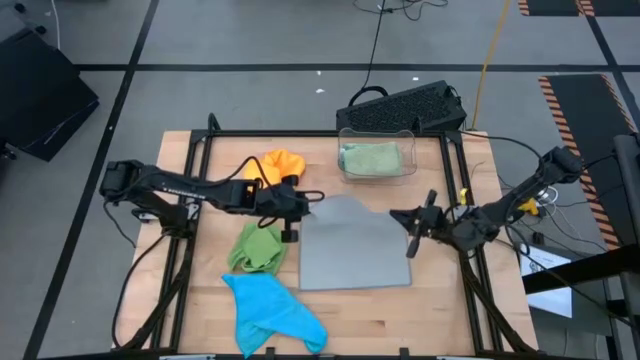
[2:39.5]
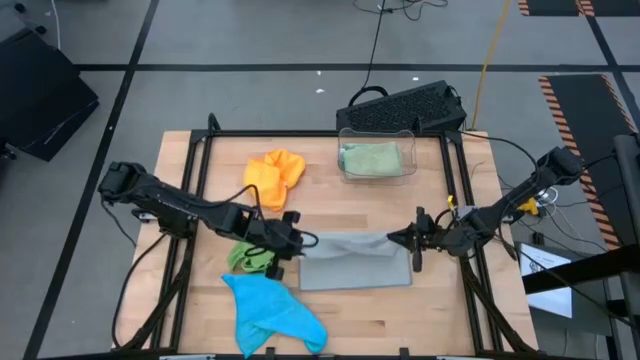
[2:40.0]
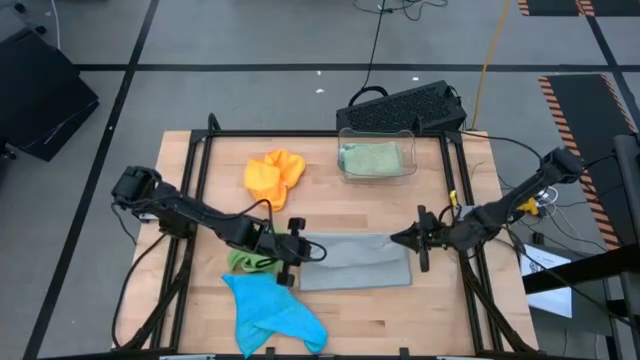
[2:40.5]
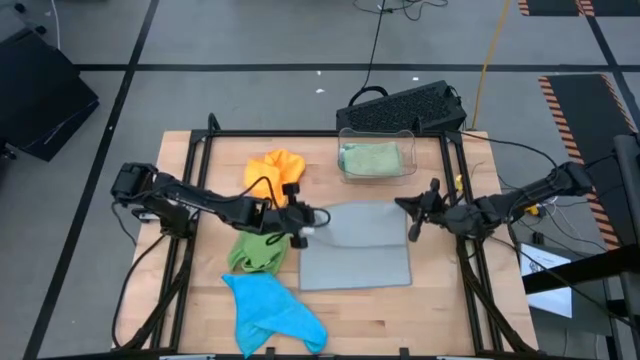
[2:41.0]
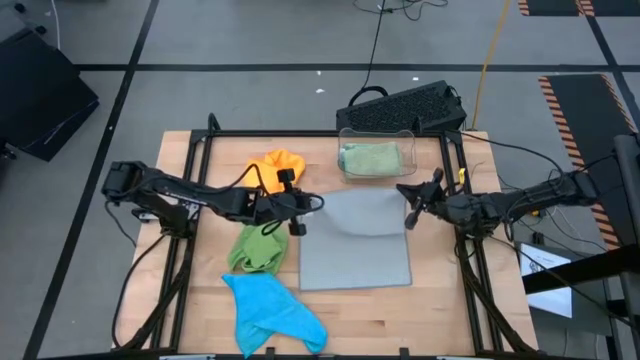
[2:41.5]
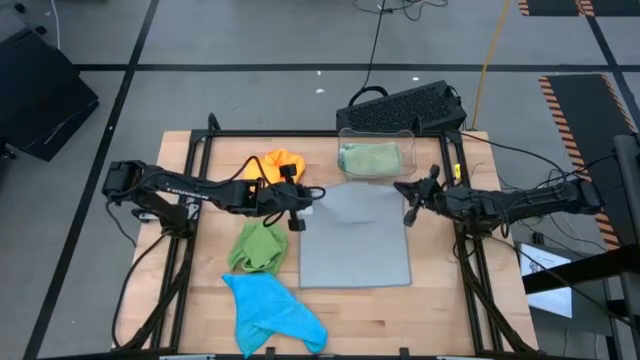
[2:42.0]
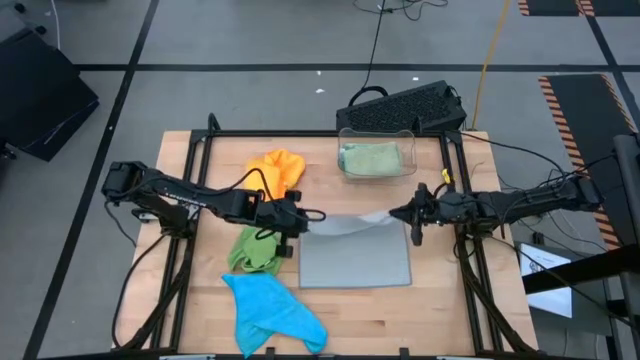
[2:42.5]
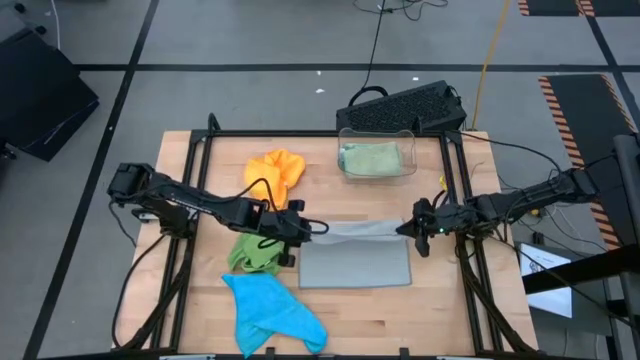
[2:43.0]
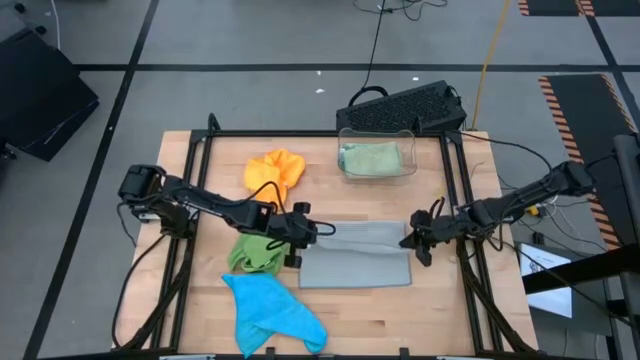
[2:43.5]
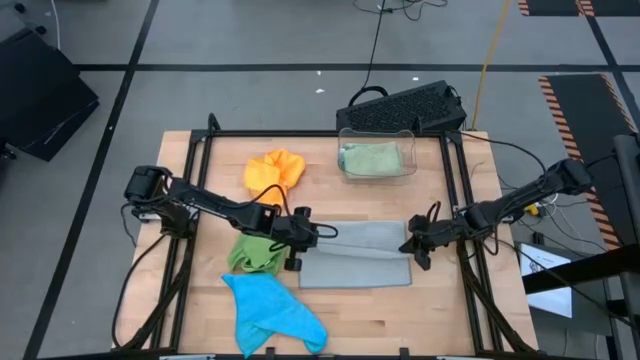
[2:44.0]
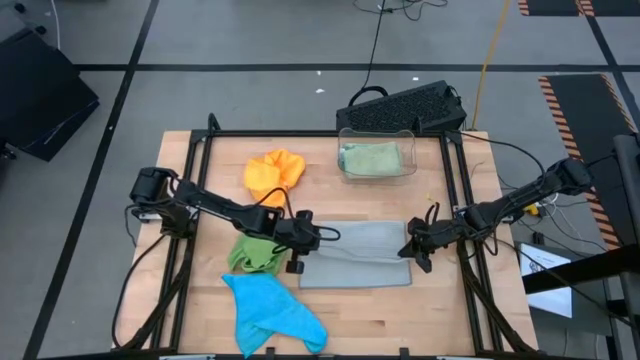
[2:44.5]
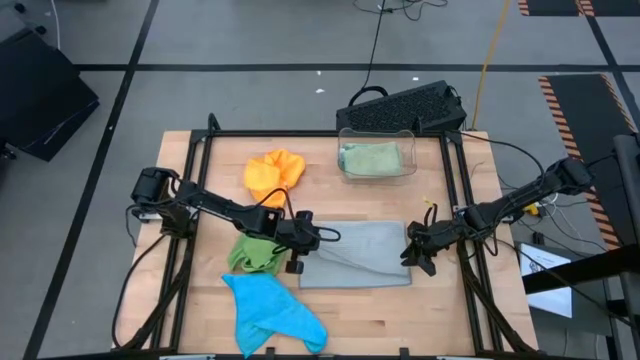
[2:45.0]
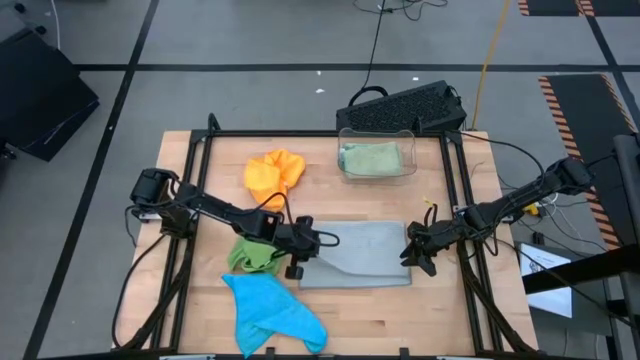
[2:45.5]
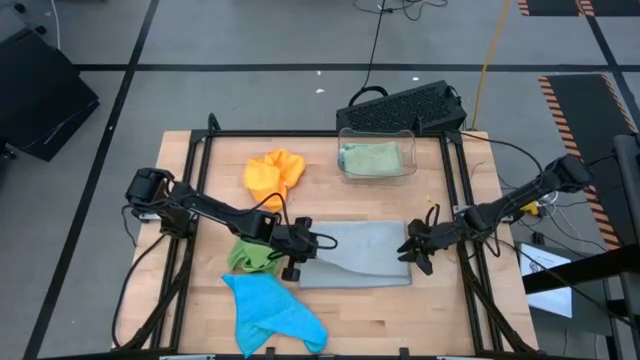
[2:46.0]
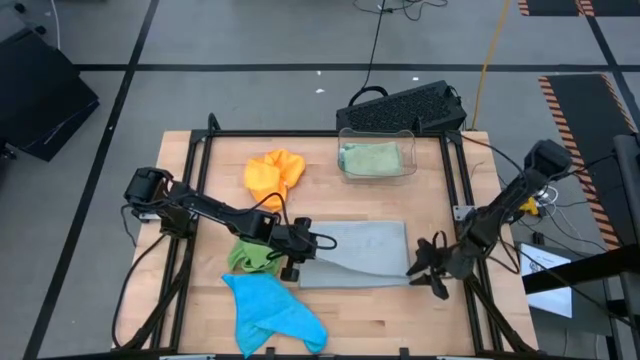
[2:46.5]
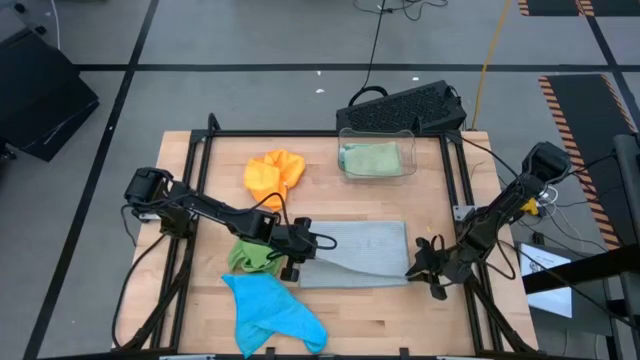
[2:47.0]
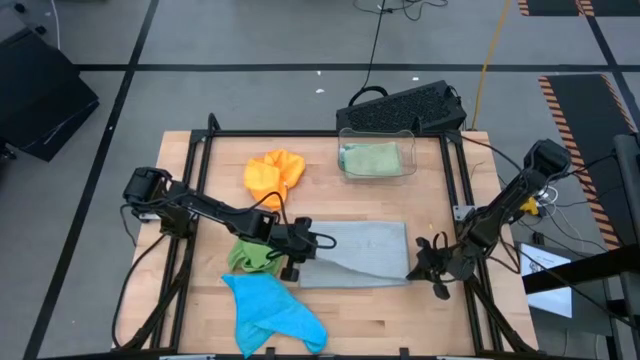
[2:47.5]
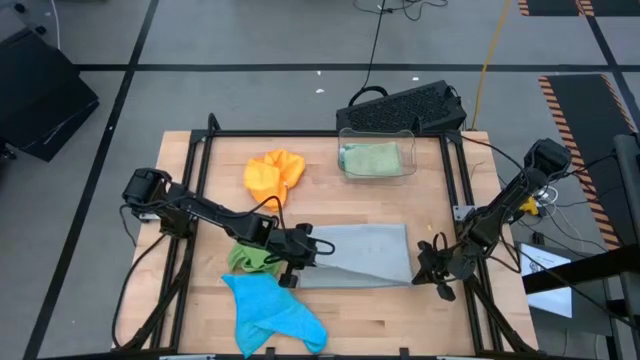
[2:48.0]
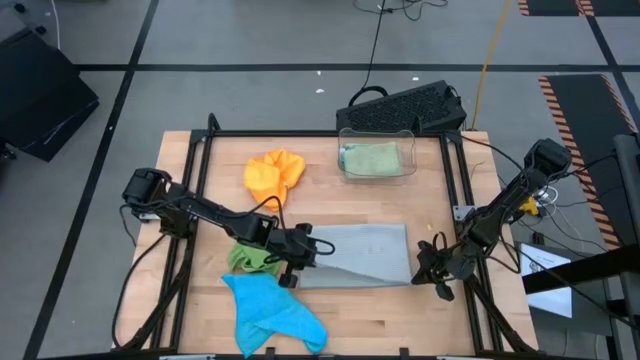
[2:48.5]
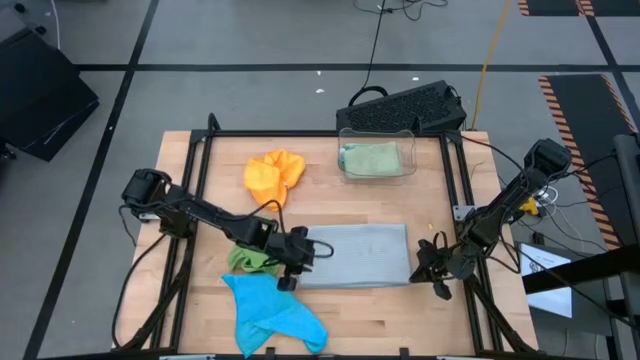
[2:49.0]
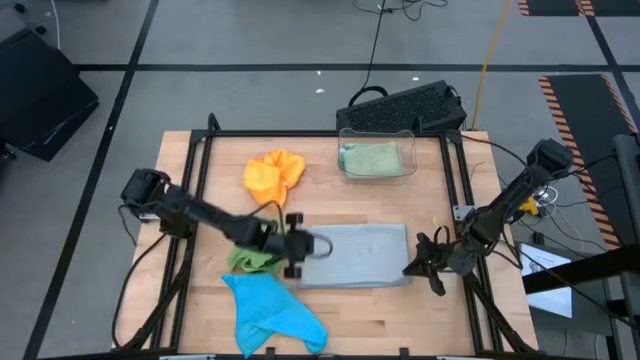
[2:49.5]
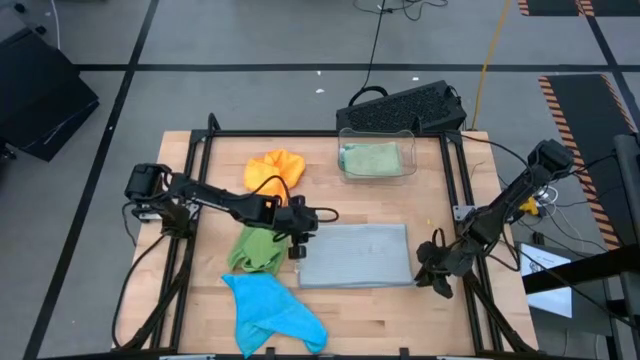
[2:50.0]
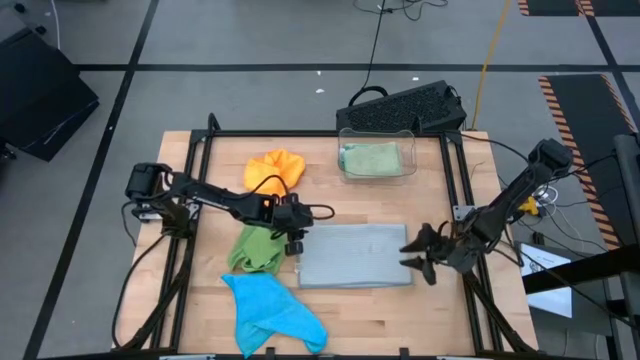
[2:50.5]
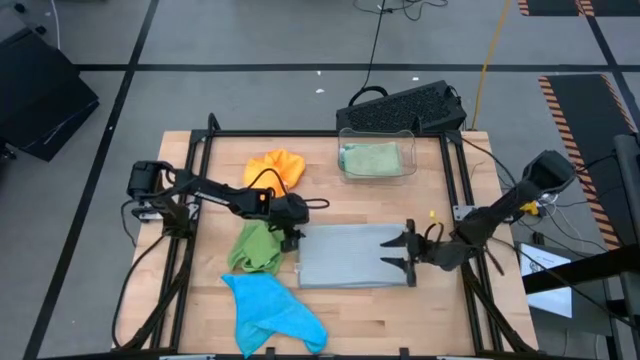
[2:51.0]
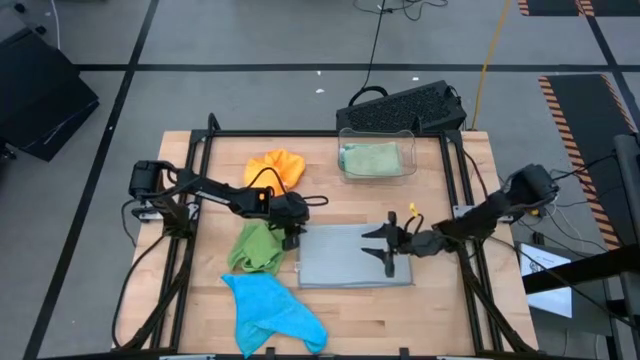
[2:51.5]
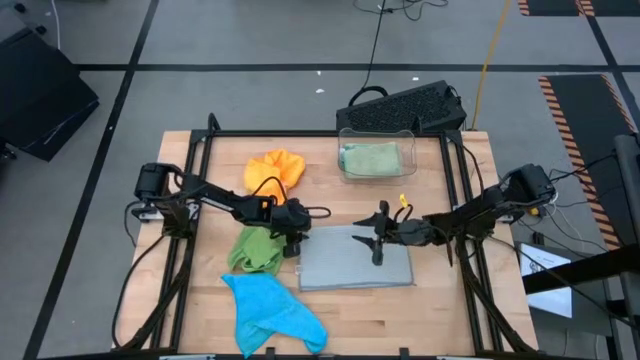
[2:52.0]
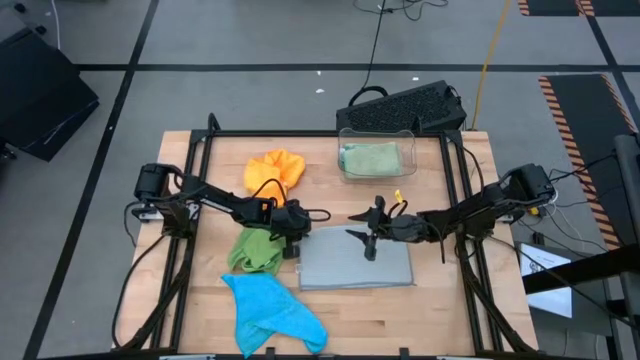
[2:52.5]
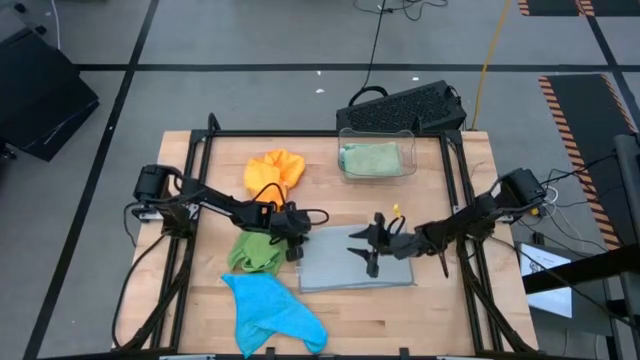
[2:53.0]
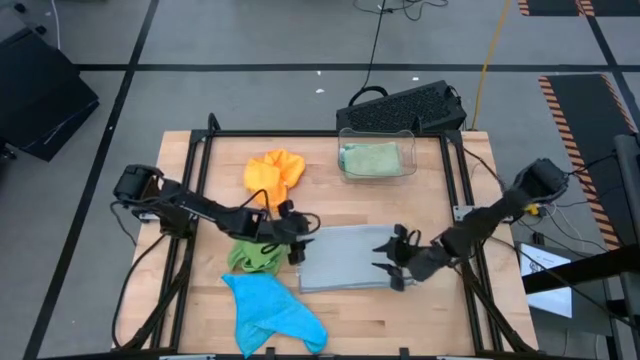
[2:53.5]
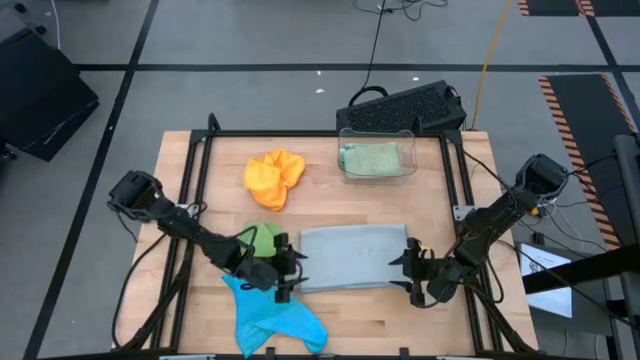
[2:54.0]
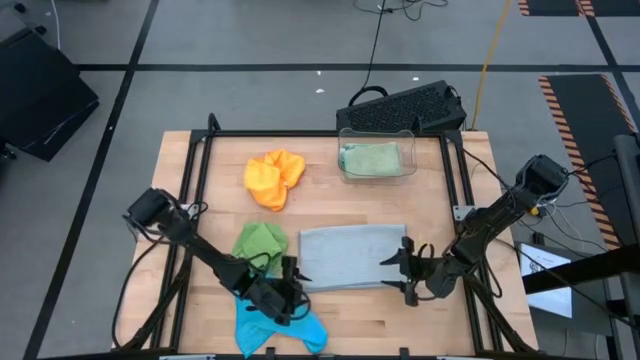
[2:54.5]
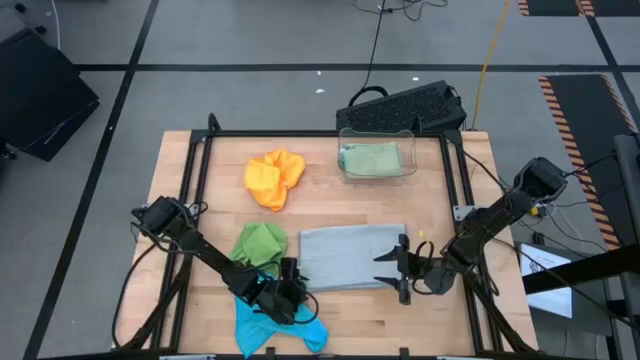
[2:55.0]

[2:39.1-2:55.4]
Task: Fold microfiber towels
Fold the gray microfiber towel

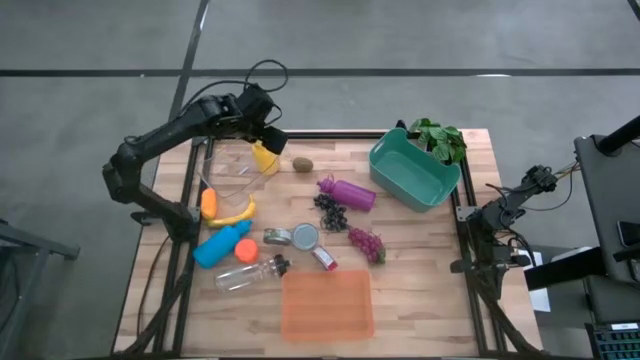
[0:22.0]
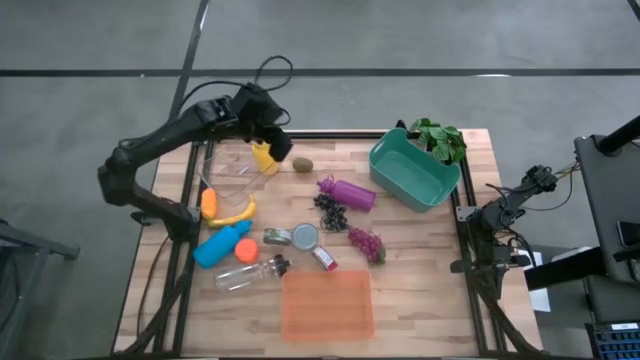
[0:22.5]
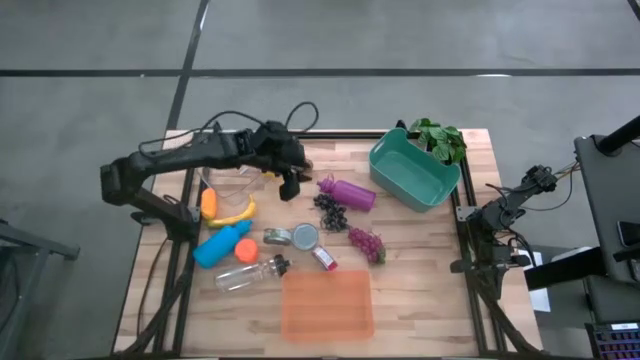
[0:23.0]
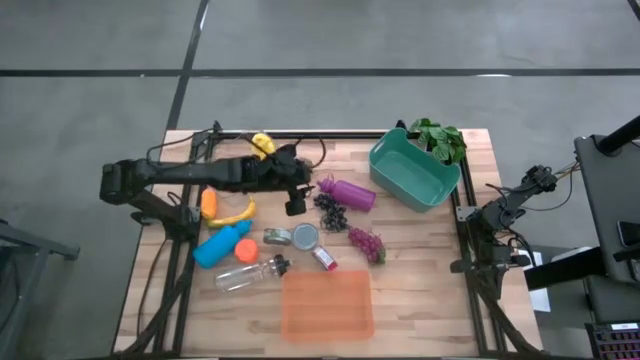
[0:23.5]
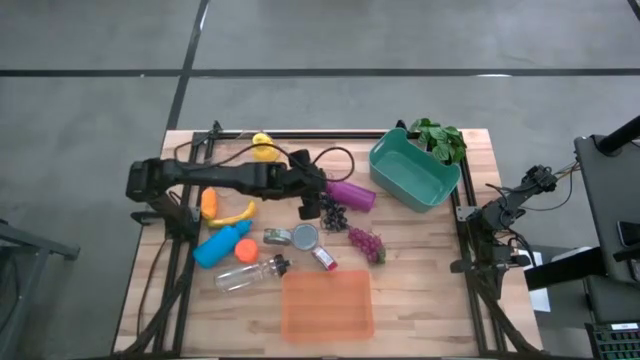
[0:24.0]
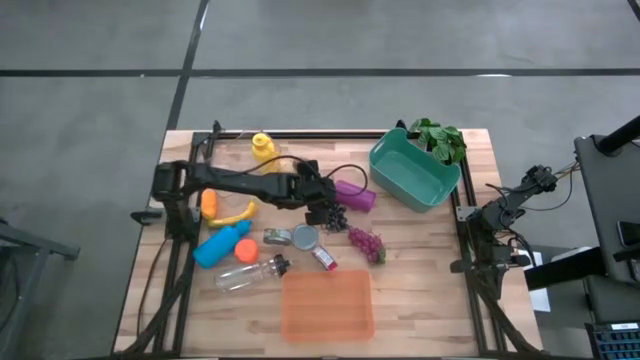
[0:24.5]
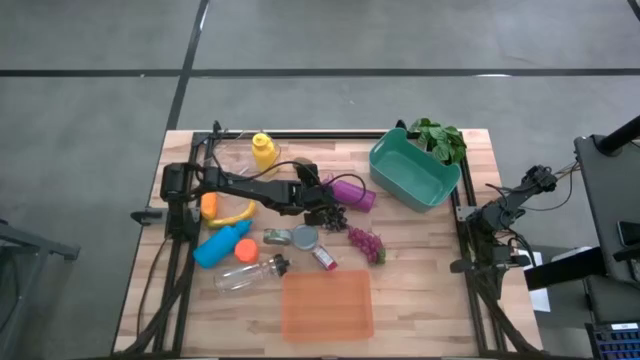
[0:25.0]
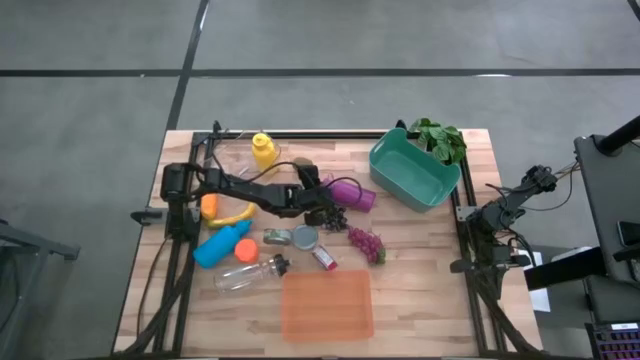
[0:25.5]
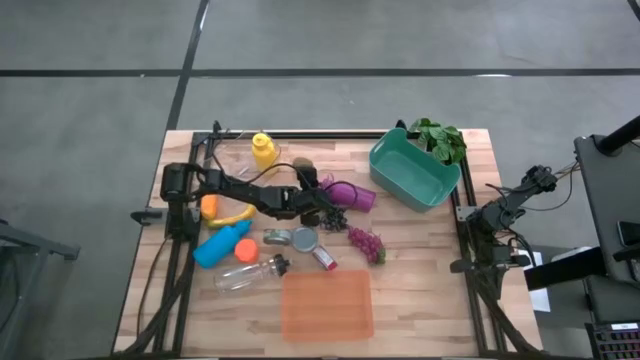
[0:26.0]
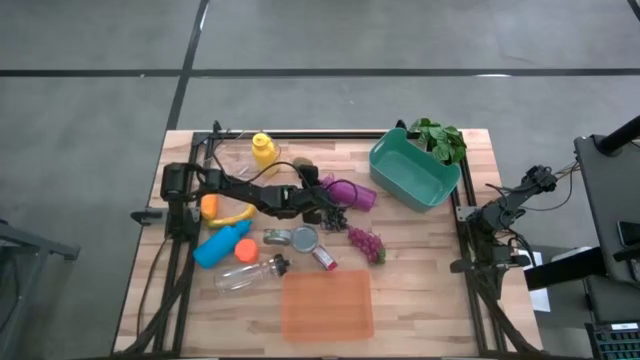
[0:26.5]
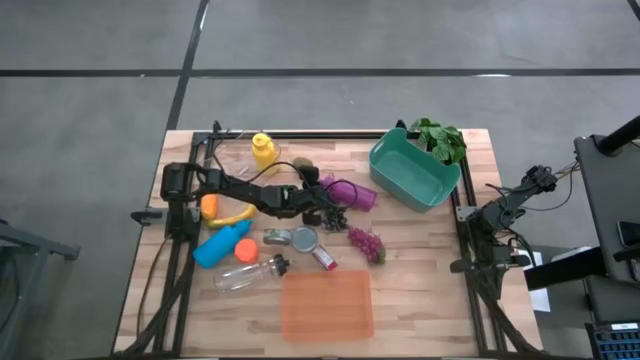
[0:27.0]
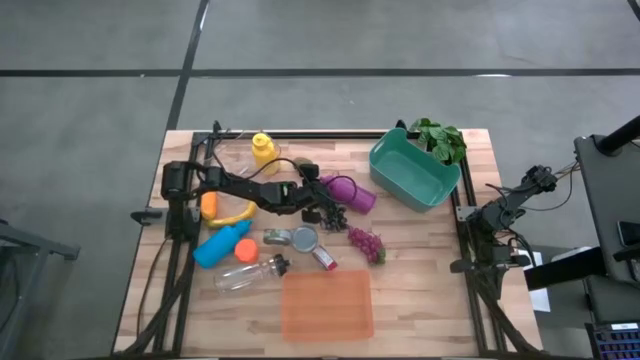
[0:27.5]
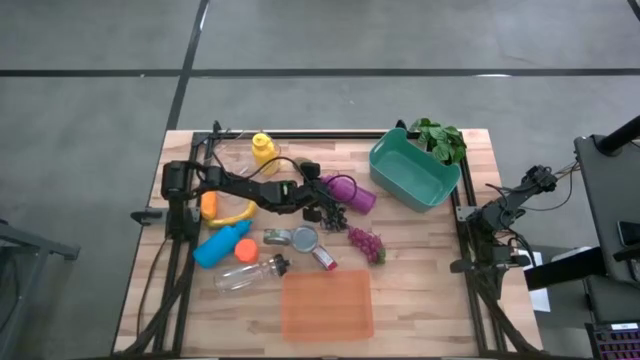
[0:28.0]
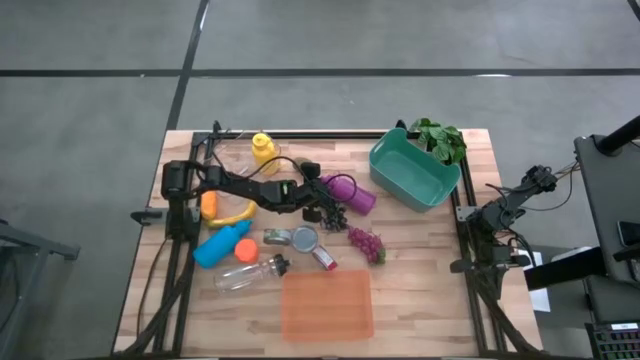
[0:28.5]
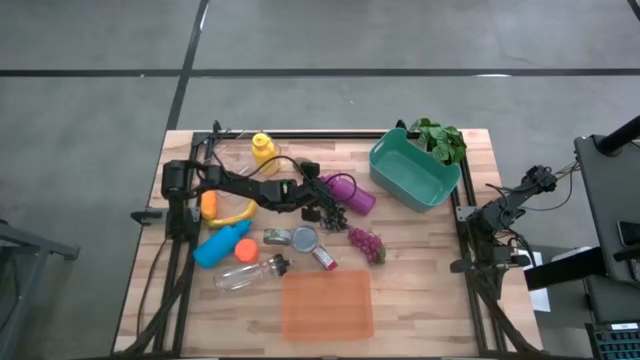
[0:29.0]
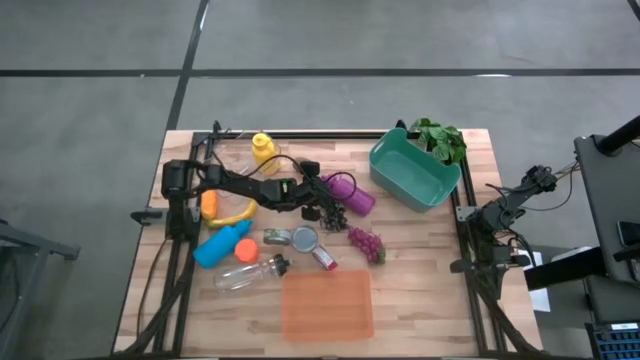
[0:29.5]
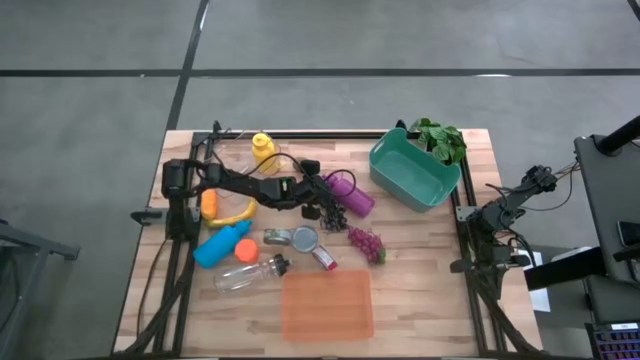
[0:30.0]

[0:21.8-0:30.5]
Task: Pick & Place Food Item
Put the purple water bottle into the transparent bin
